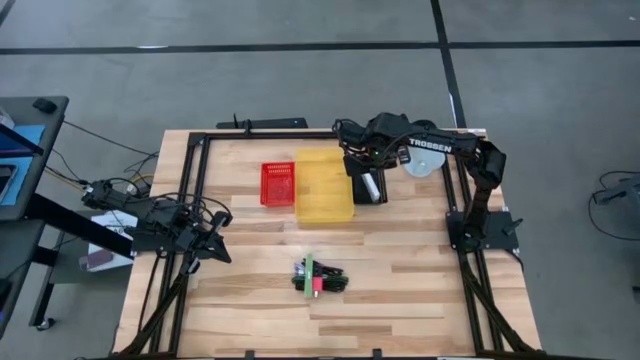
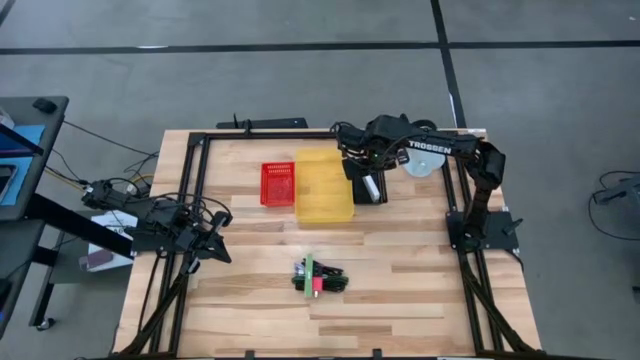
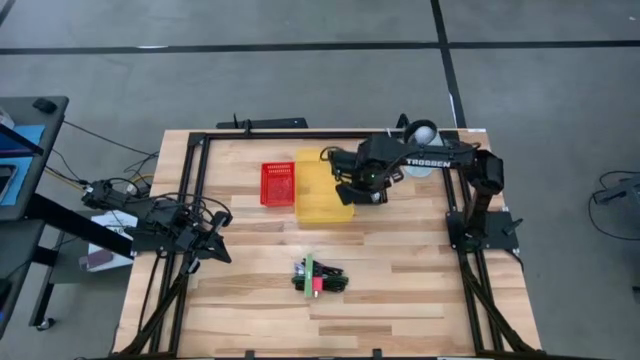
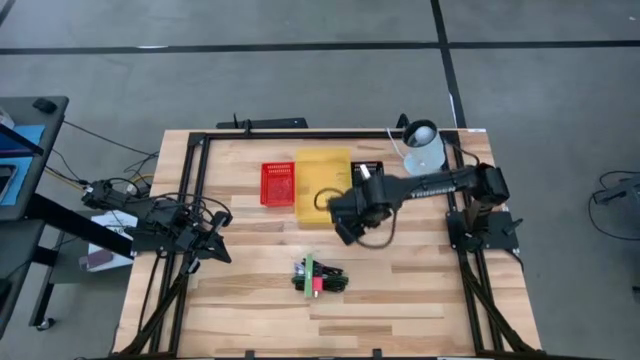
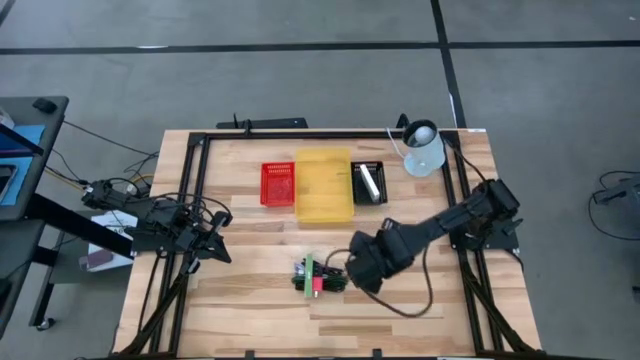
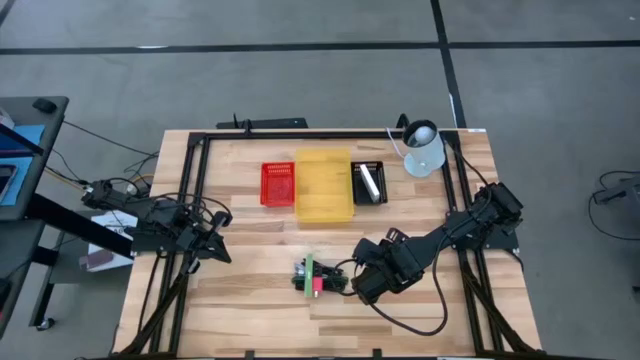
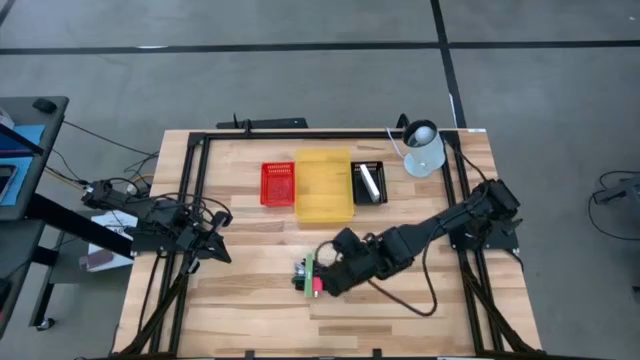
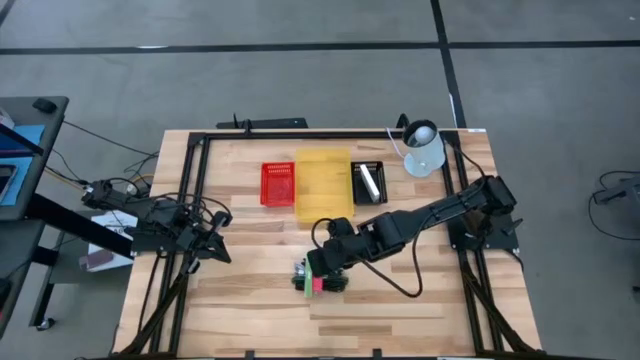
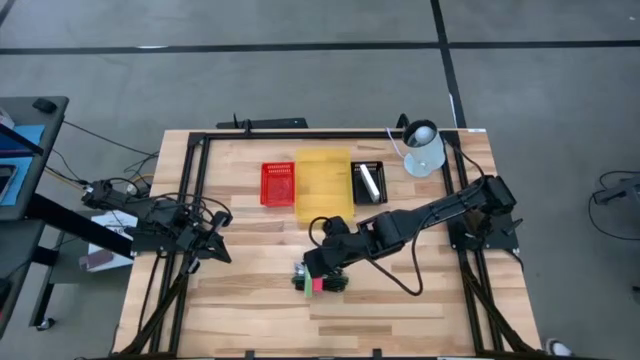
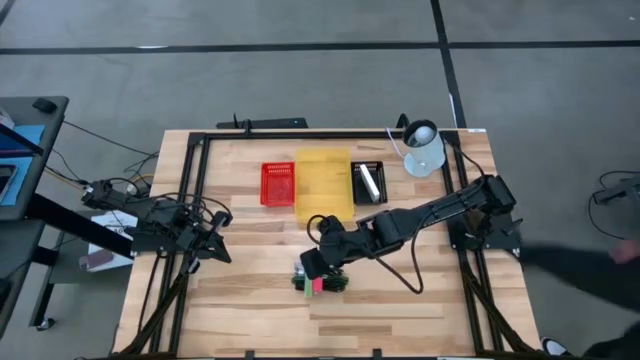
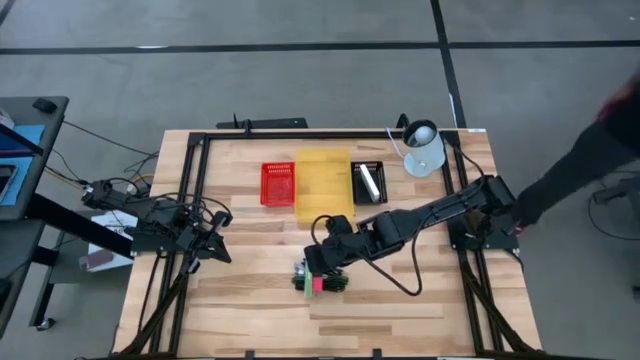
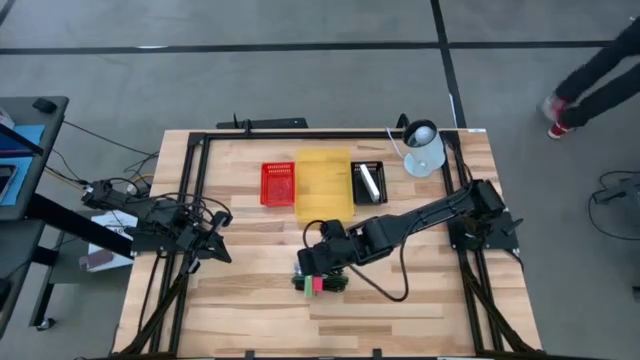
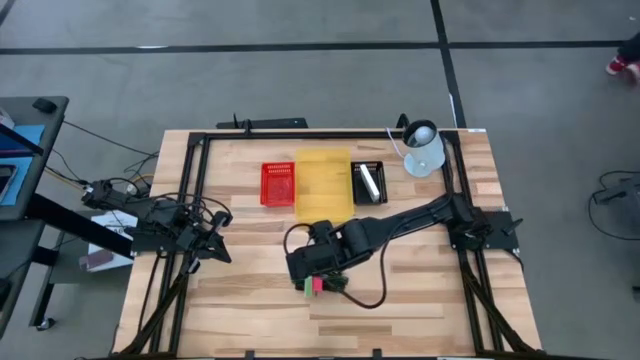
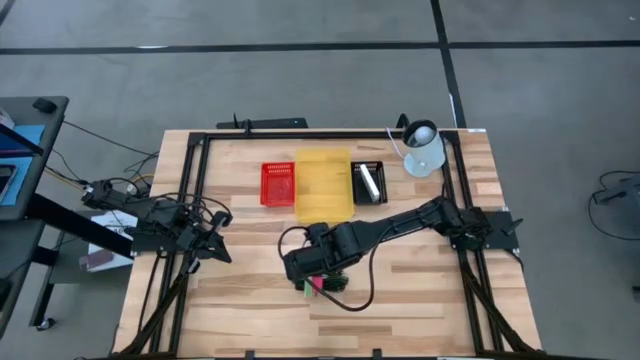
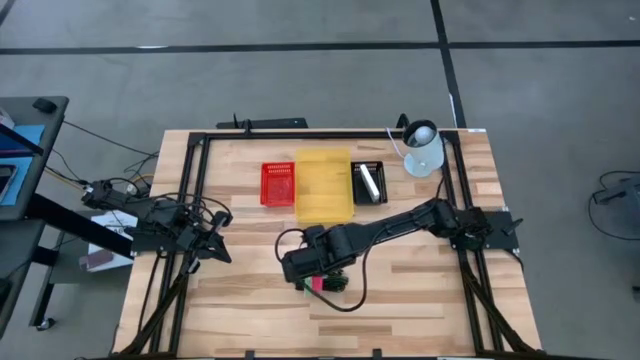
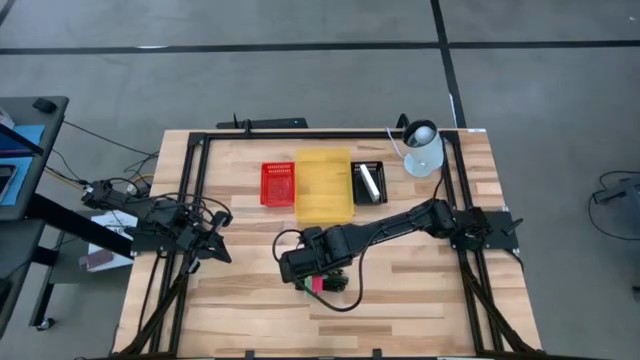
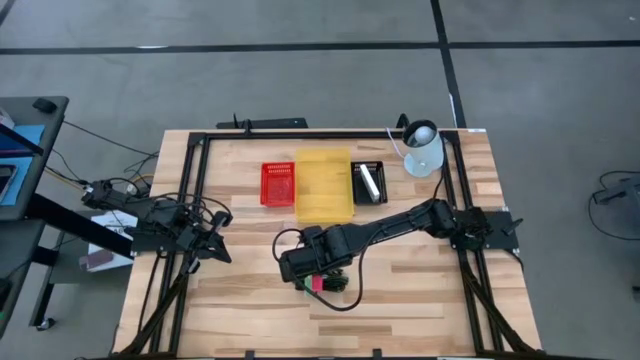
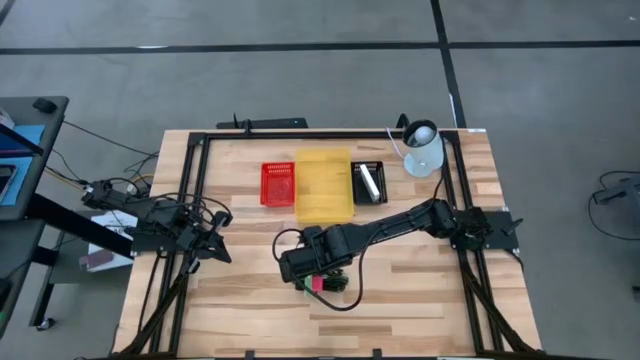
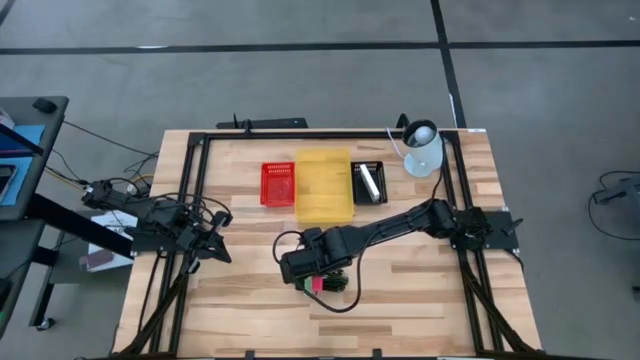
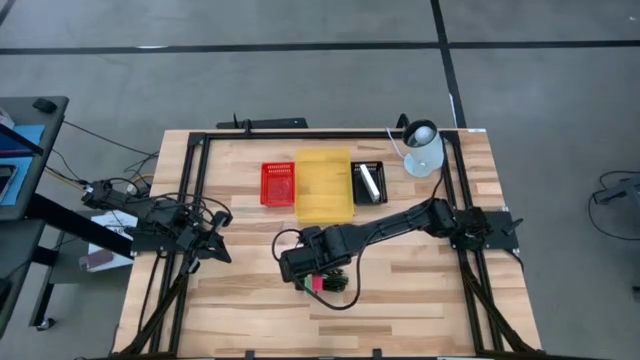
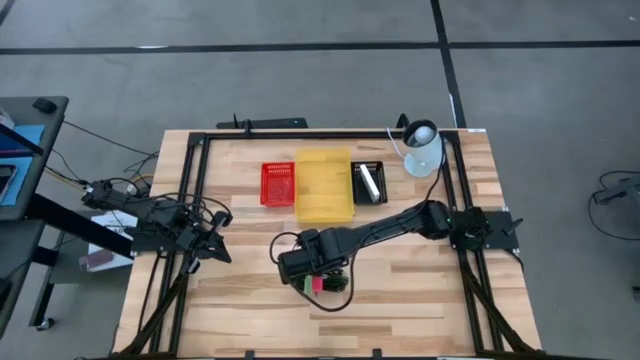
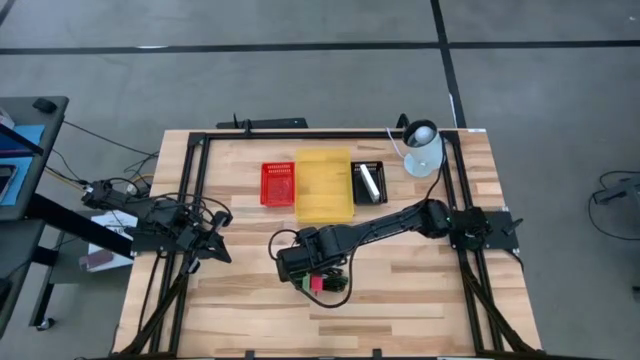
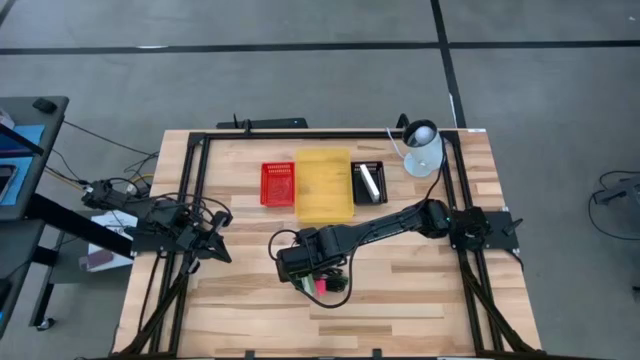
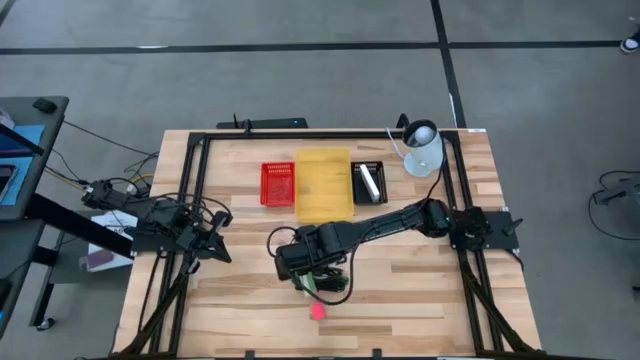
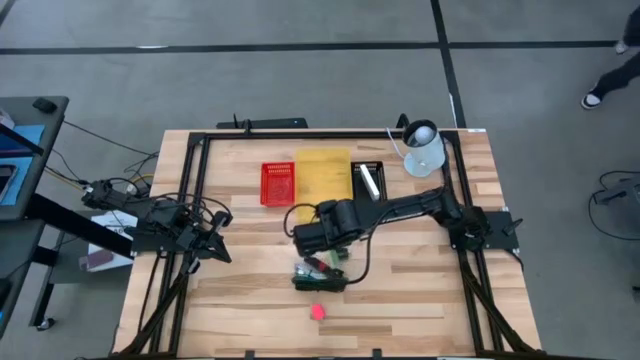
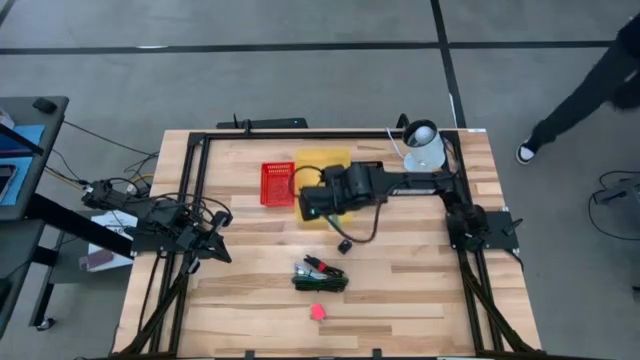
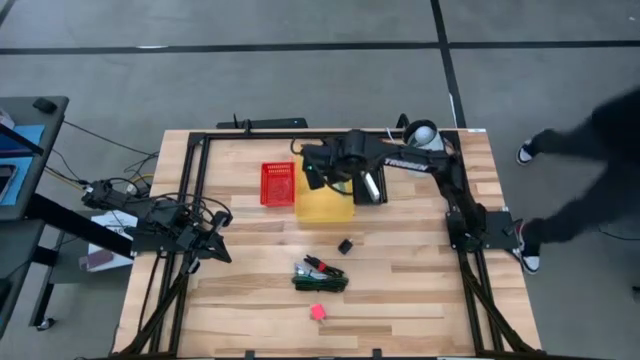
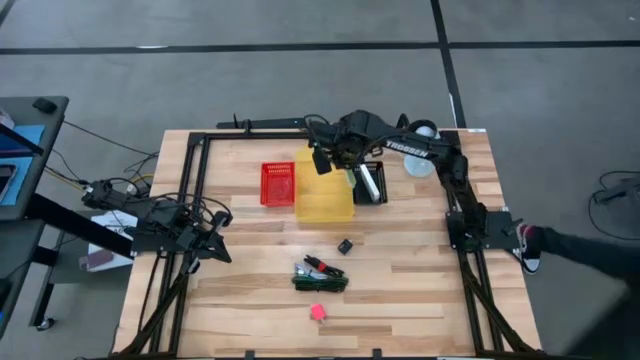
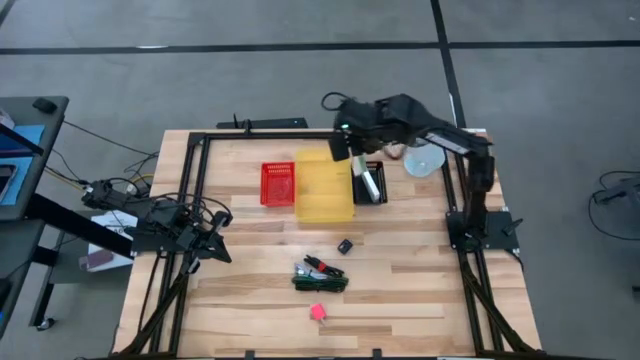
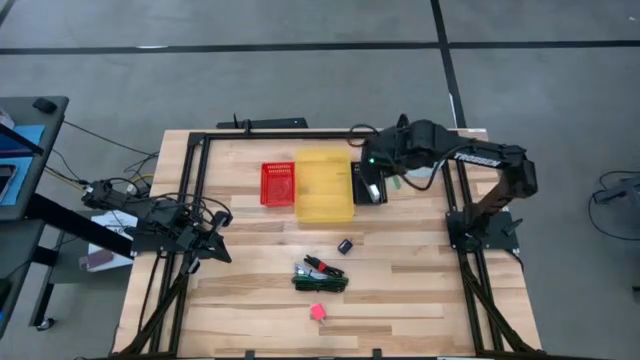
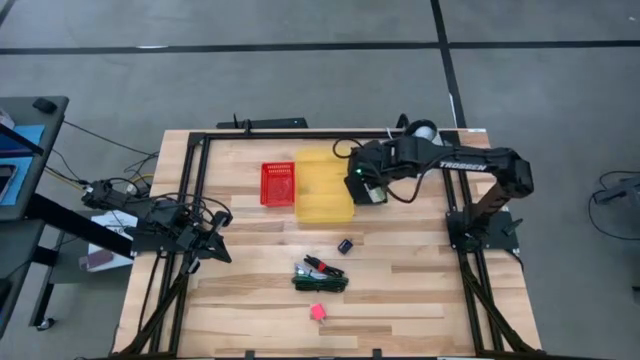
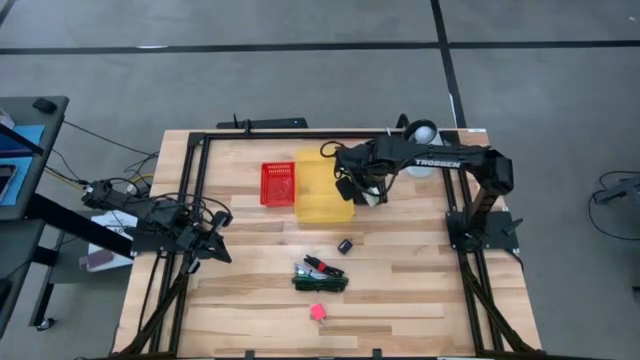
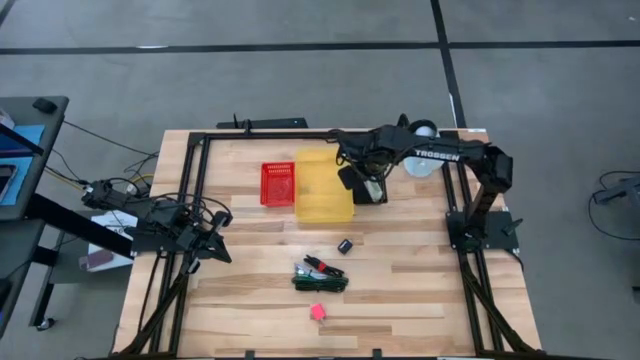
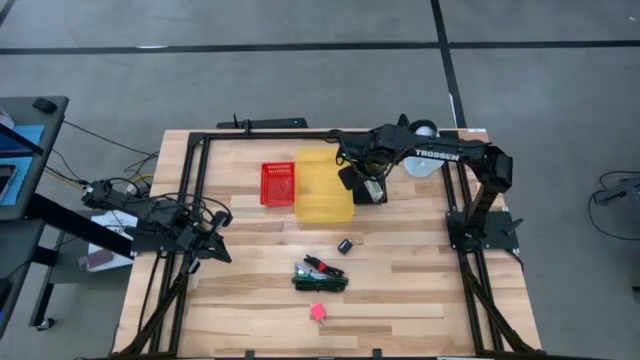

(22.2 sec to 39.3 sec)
Task: Pick and place items into bin
Put the green box into the black bin
